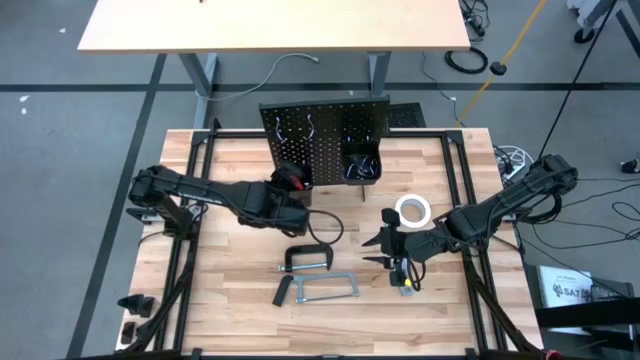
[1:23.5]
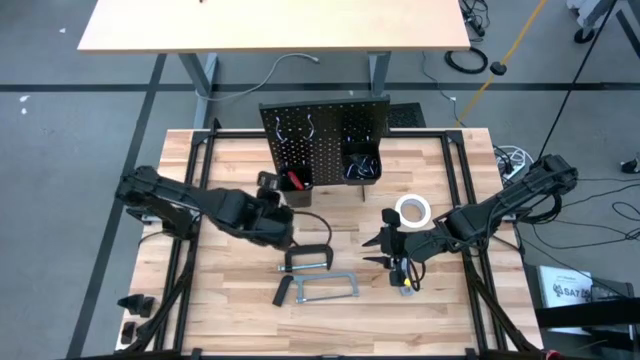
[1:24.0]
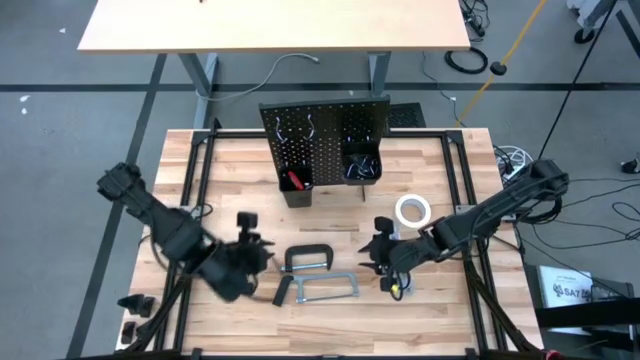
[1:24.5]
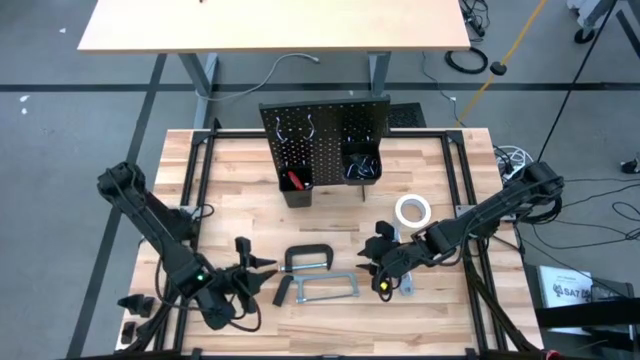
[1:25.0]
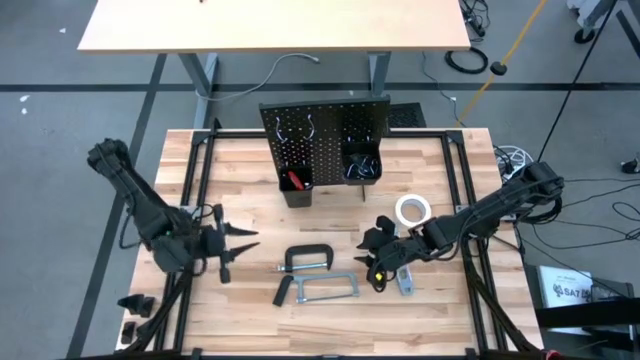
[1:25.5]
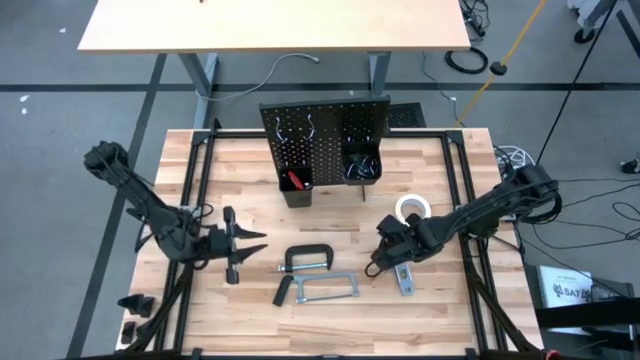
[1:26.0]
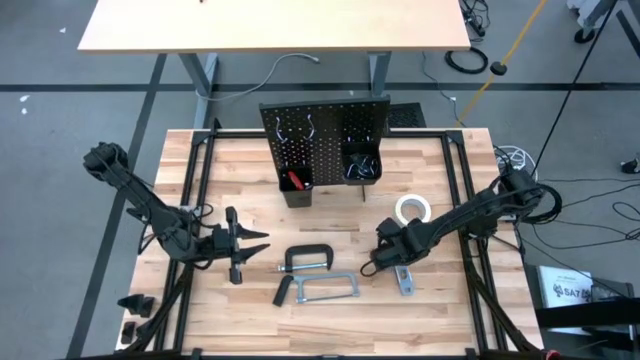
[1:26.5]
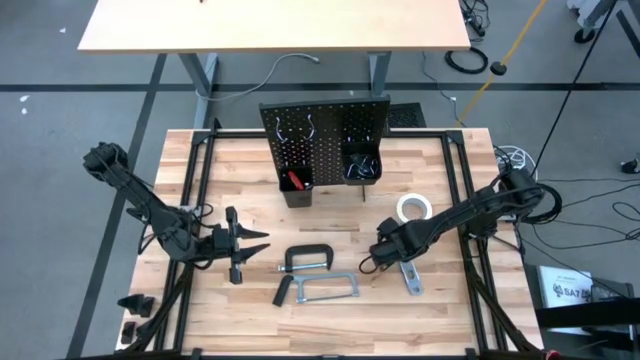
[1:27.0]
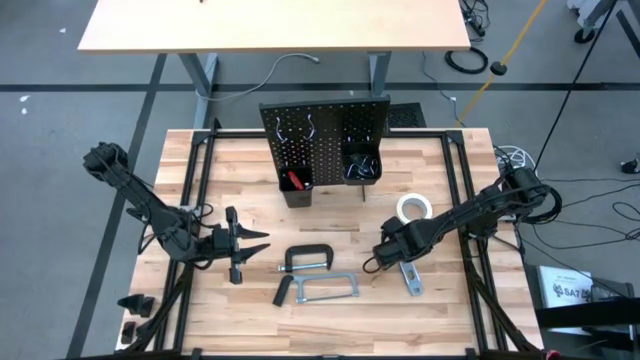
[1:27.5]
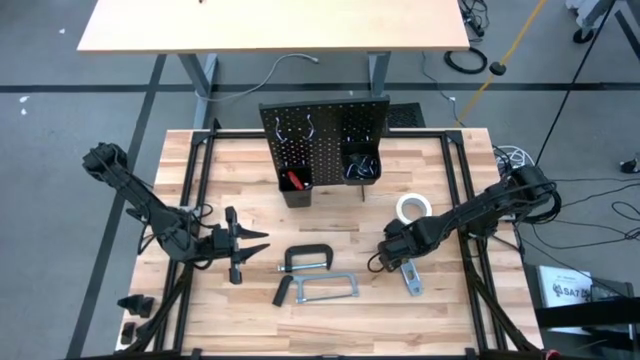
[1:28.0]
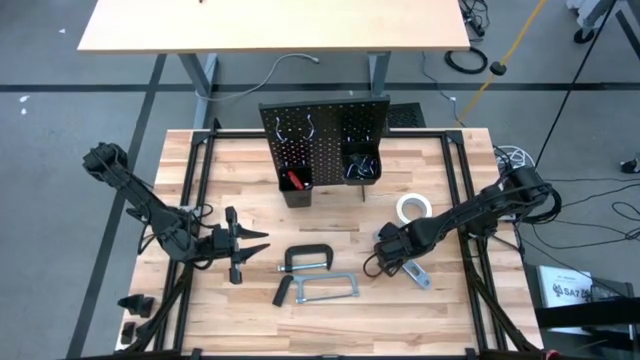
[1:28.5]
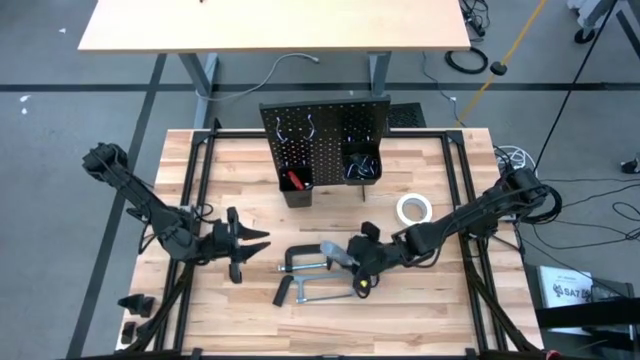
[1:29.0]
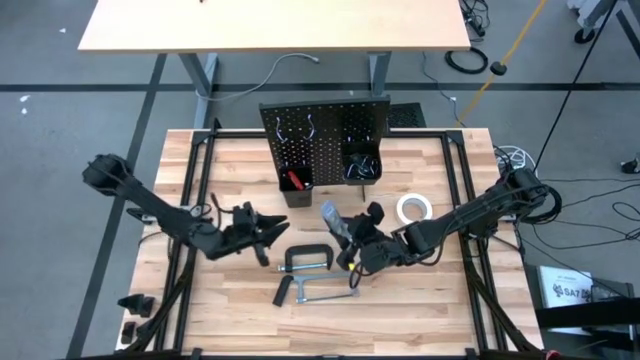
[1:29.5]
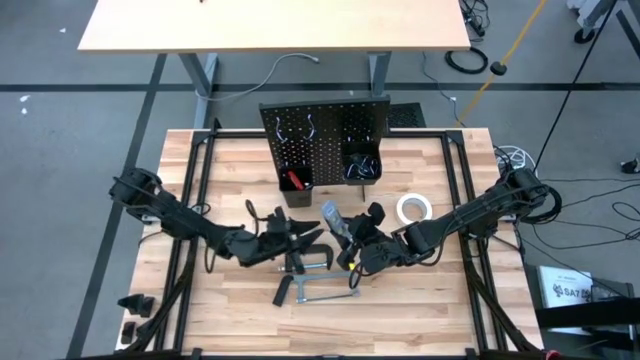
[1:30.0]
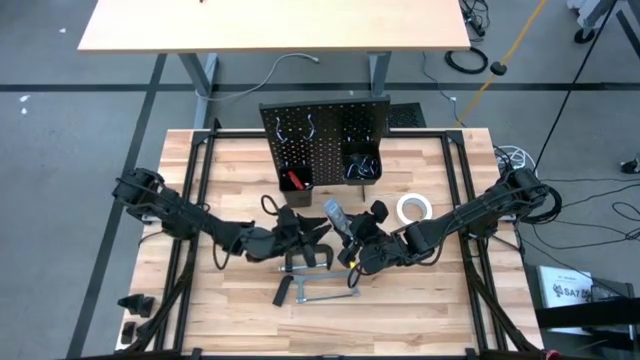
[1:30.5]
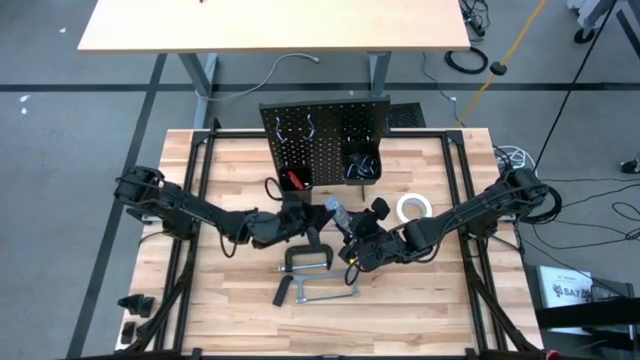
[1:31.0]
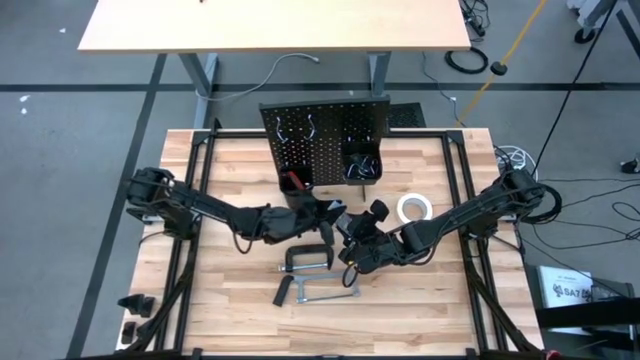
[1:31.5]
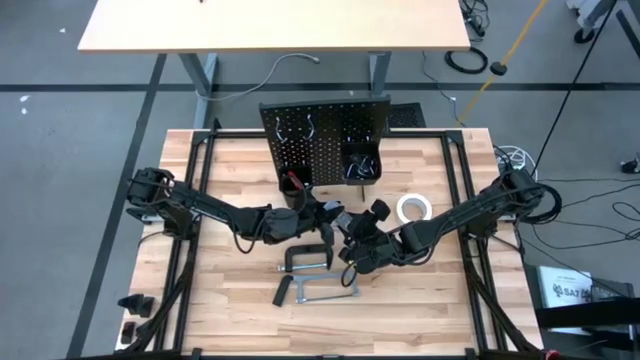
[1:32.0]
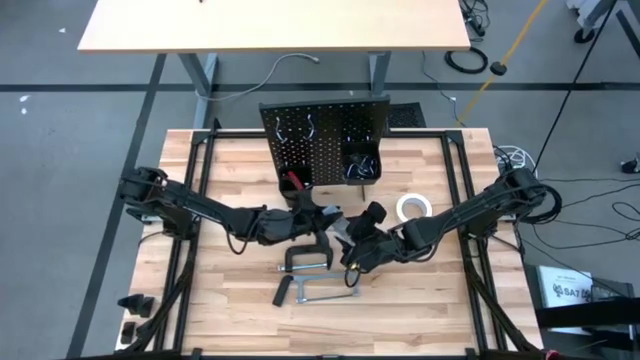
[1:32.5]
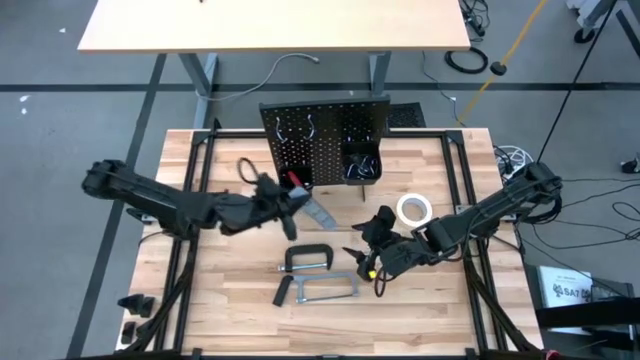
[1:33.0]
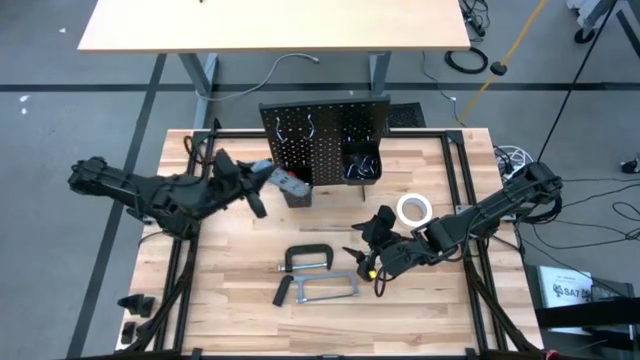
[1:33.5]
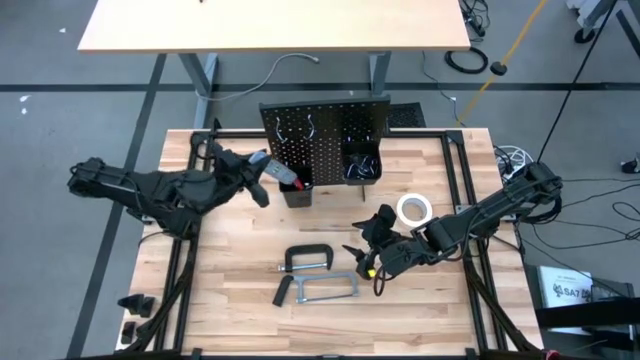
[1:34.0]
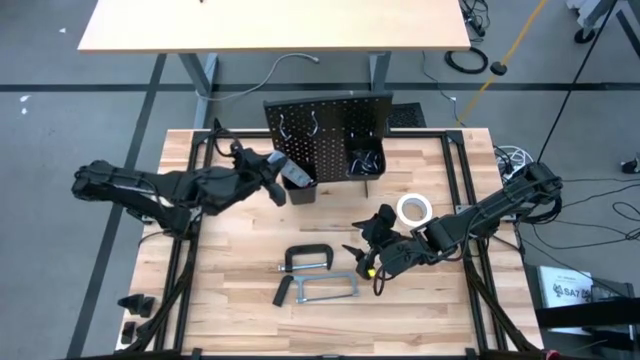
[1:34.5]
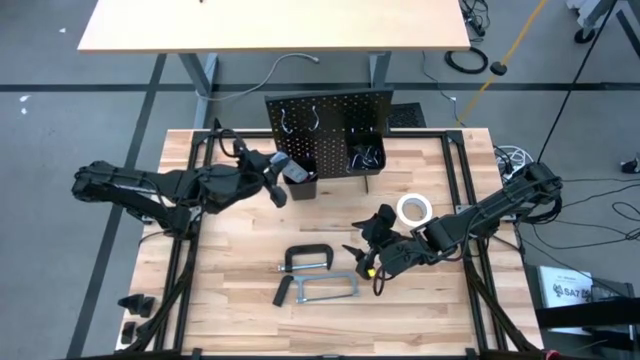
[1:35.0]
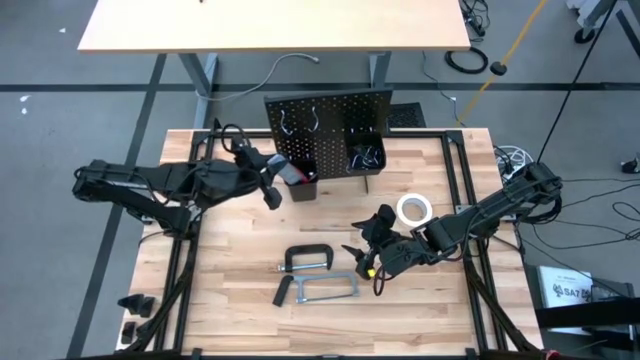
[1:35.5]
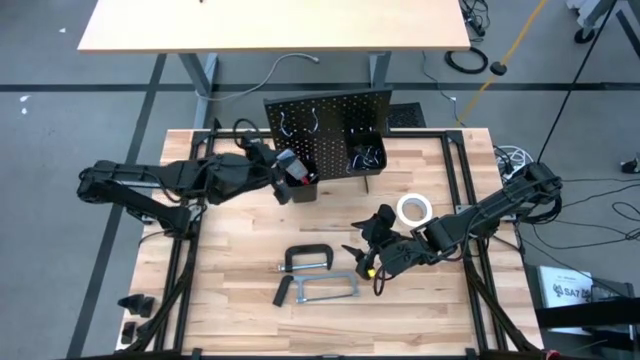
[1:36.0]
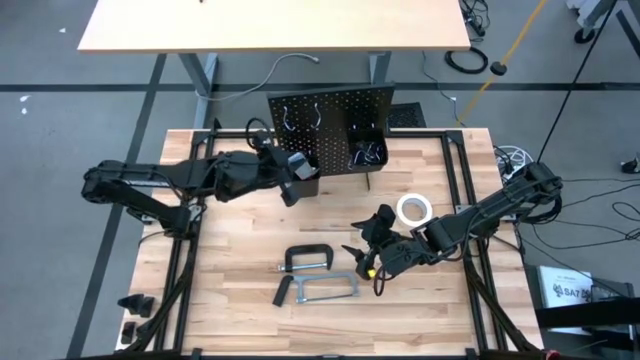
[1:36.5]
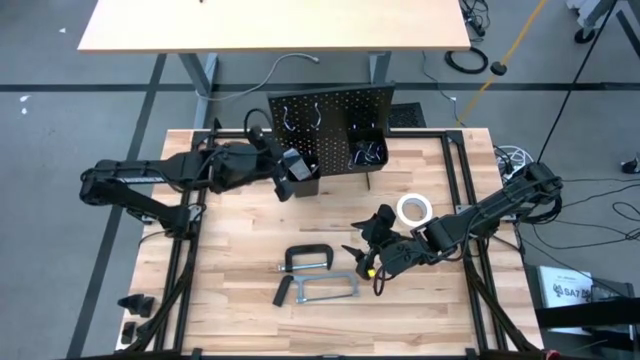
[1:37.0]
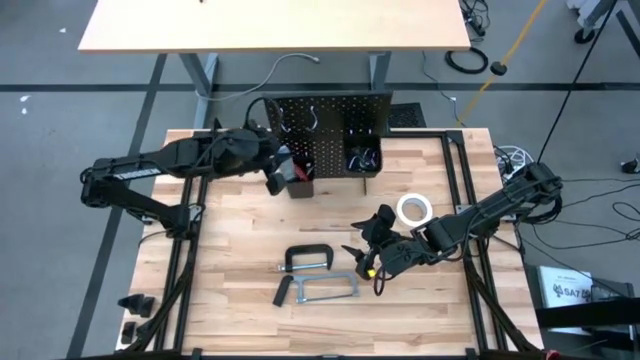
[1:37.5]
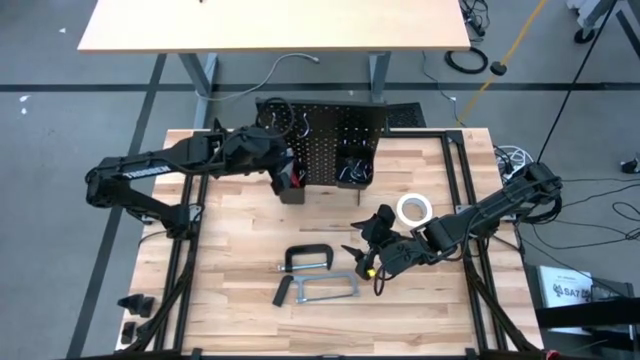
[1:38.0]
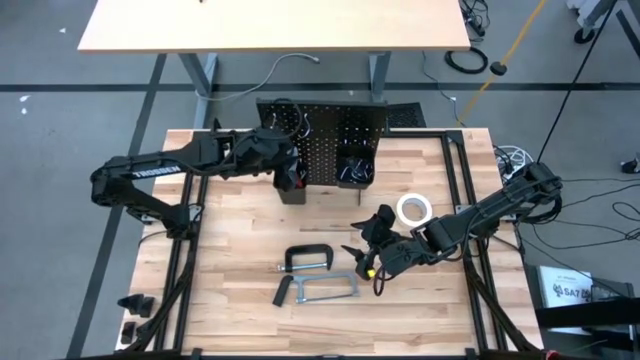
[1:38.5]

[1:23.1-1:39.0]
Task: Hang tools onto peg board
Put the spirit level into the left black bin on the peg board

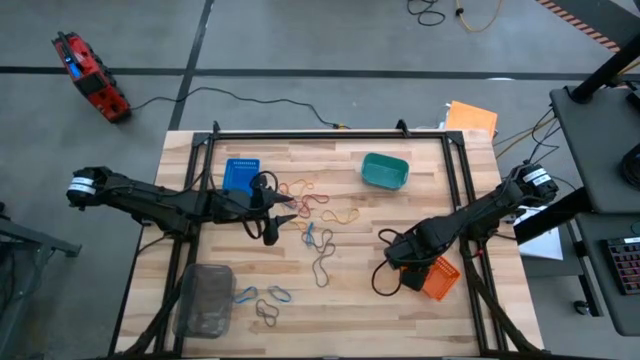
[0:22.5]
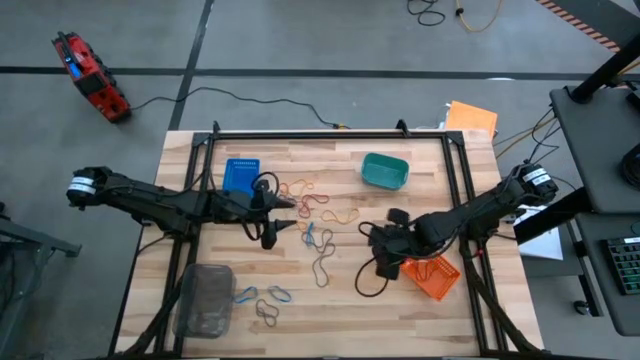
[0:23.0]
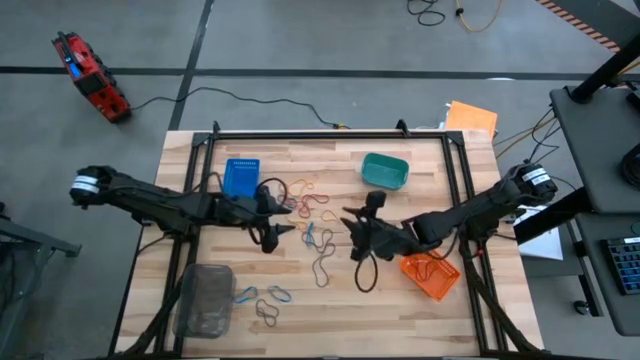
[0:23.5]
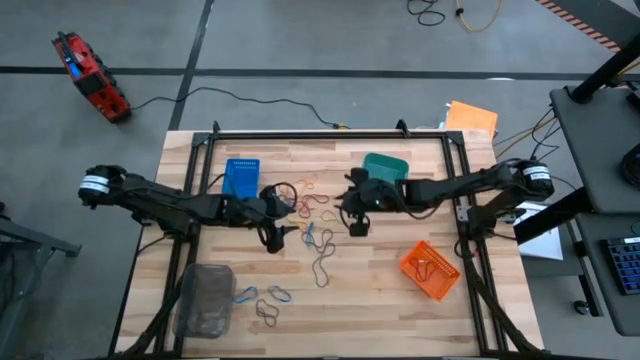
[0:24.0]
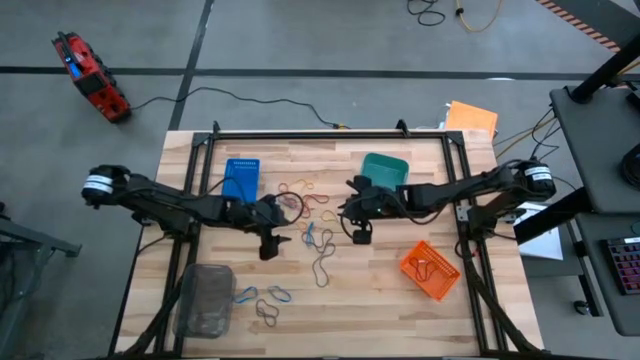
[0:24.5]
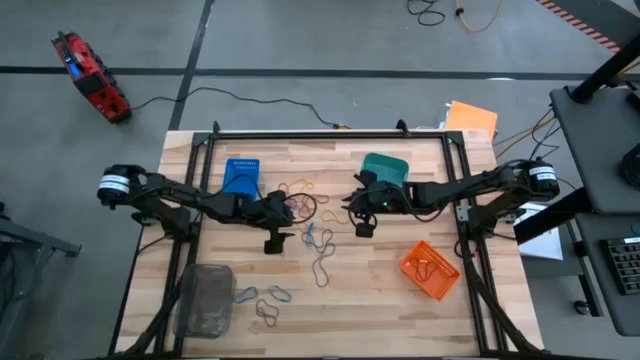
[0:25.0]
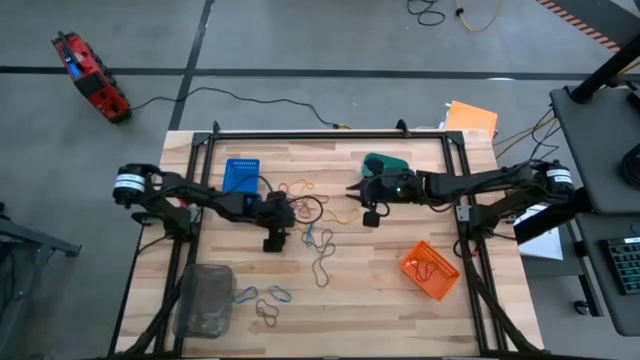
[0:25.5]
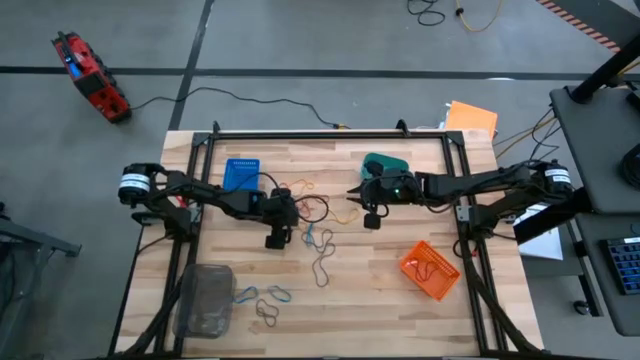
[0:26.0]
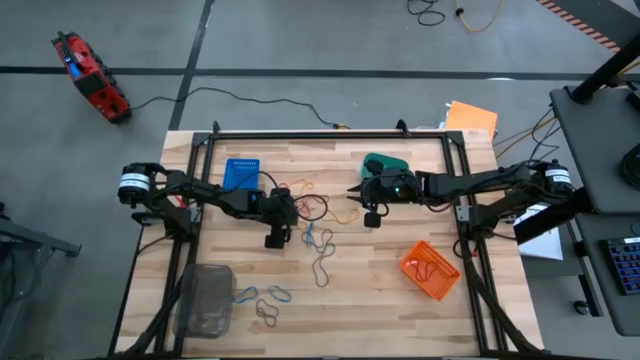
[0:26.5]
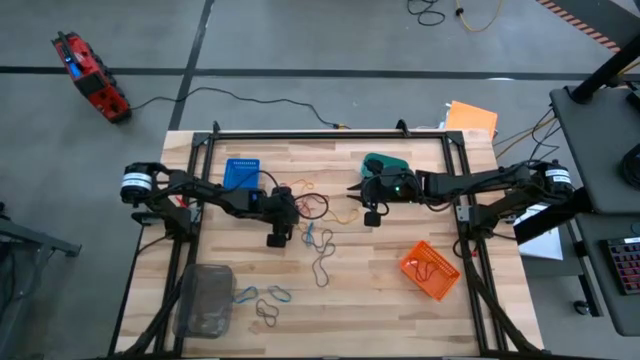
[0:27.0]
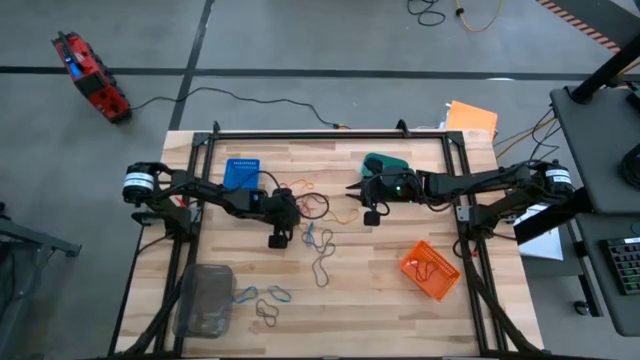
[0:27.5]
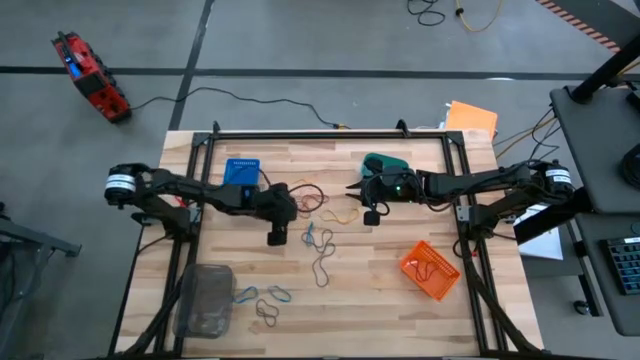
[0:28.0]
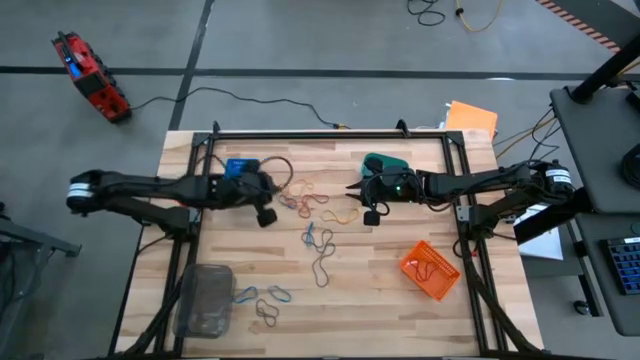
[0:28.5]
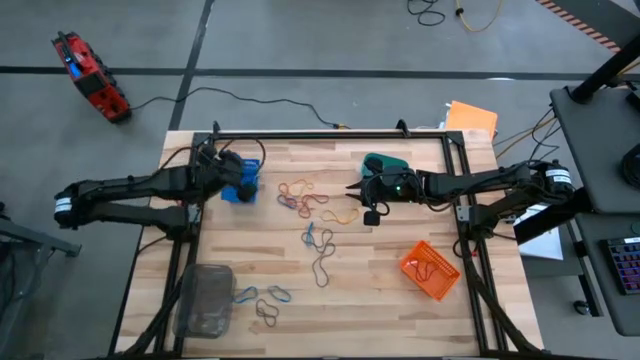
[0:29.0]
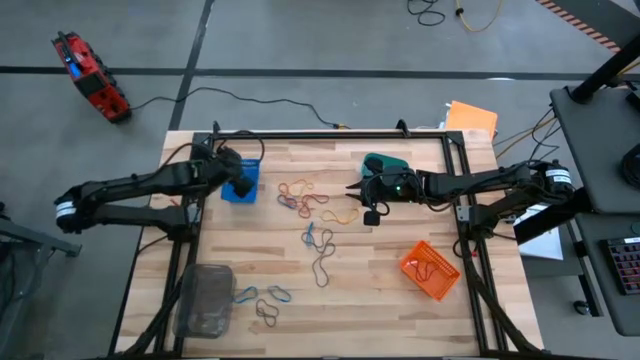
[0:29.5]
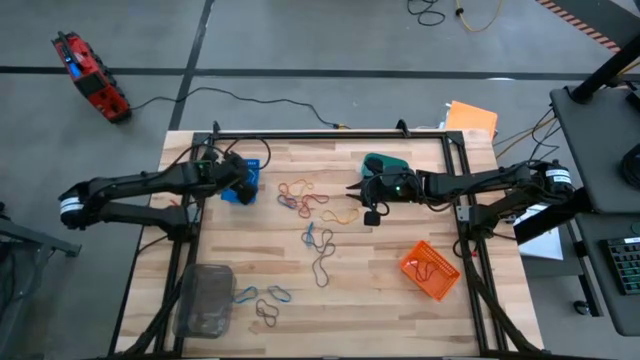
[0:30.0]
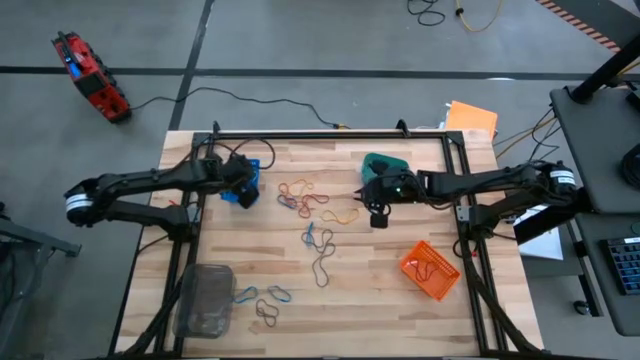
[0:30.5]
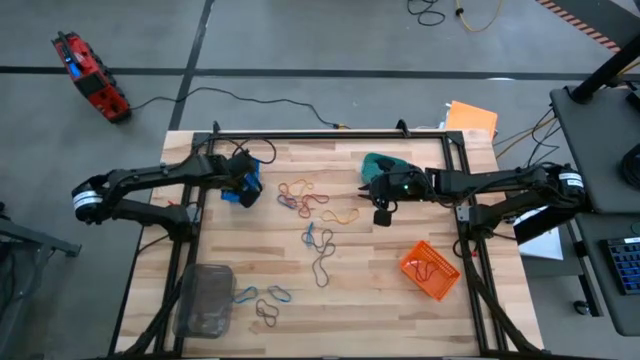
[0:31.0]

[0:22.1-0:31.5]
Task: Sort rubber bands into baskets
Put the yellow rubberband into the blue bin
